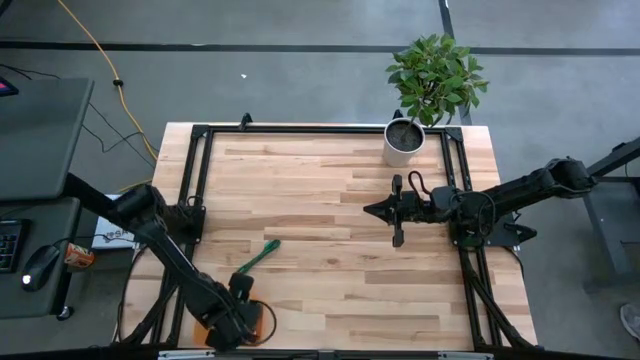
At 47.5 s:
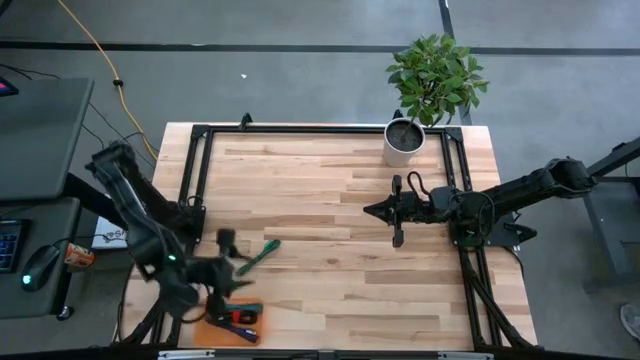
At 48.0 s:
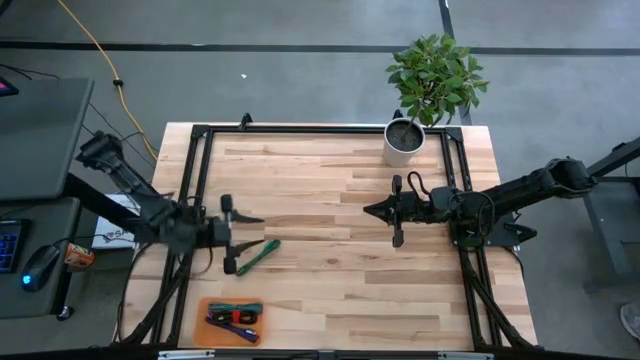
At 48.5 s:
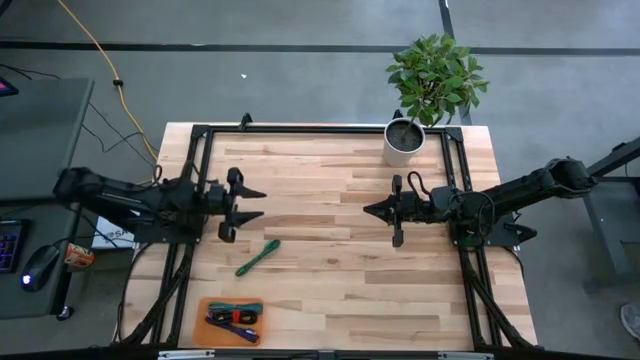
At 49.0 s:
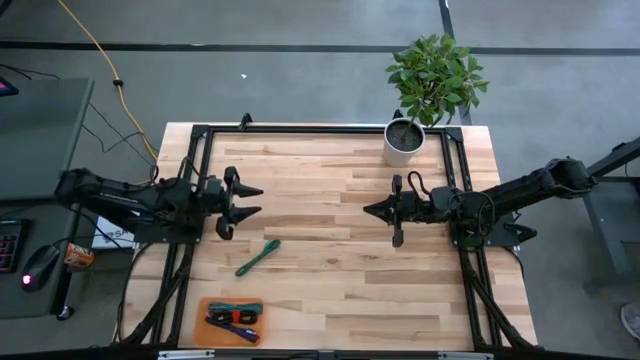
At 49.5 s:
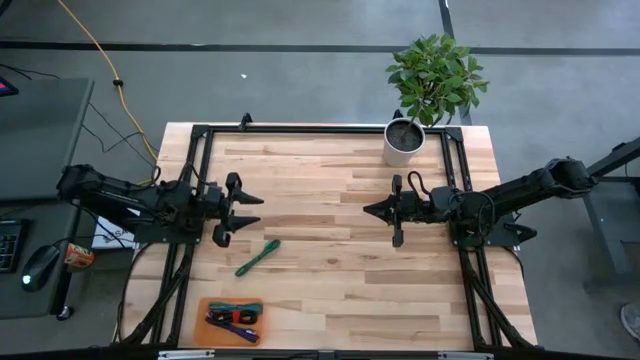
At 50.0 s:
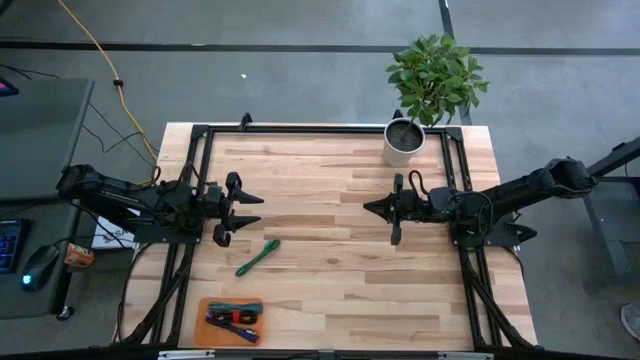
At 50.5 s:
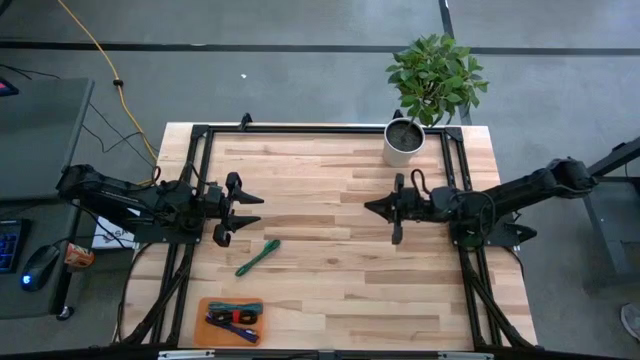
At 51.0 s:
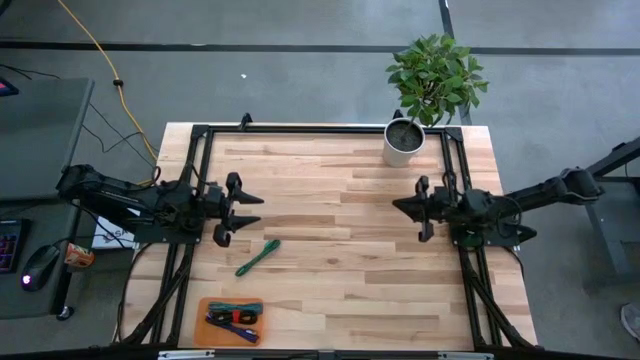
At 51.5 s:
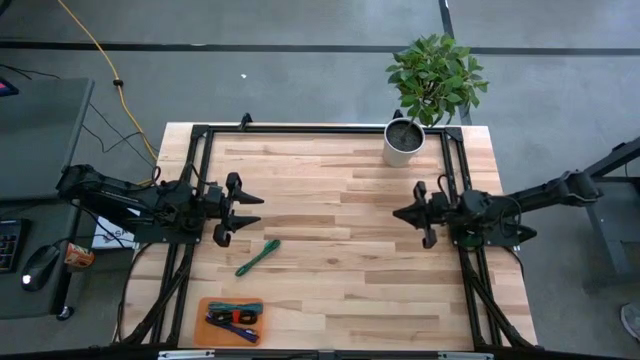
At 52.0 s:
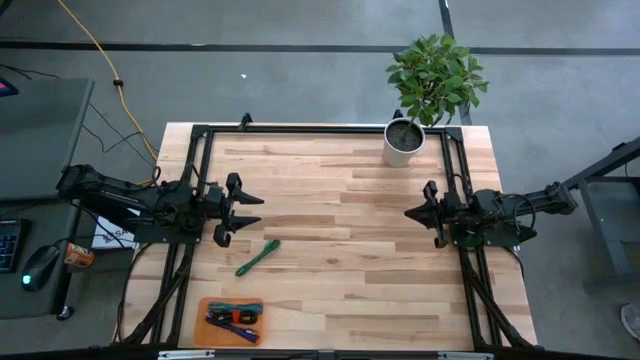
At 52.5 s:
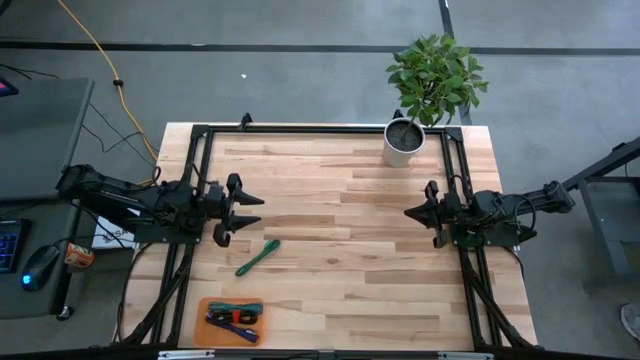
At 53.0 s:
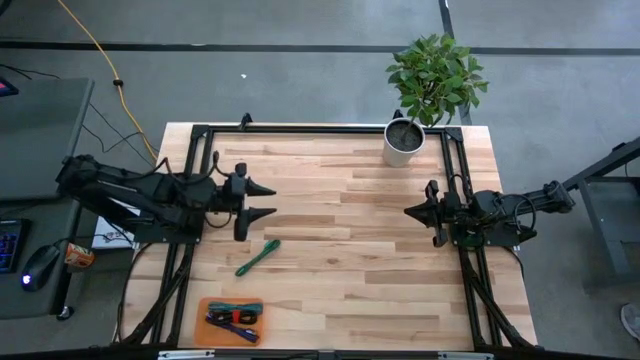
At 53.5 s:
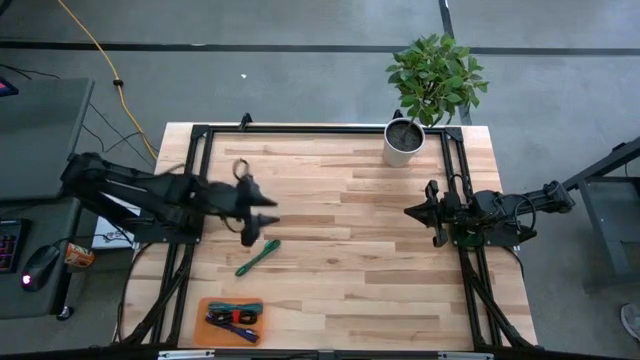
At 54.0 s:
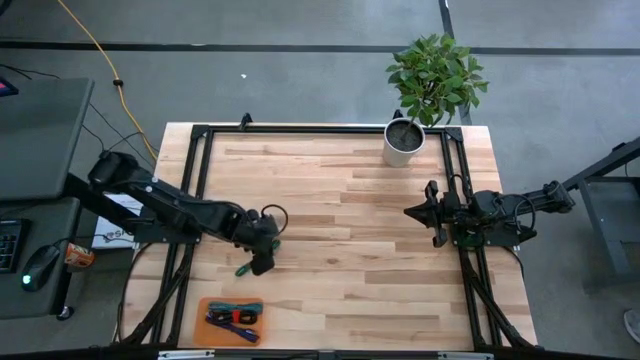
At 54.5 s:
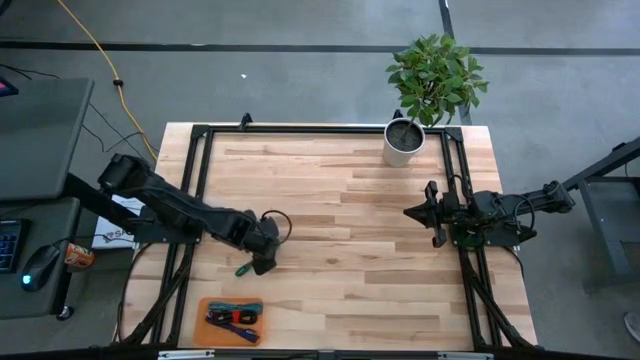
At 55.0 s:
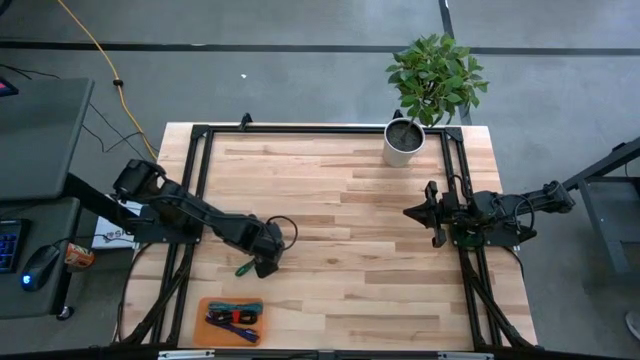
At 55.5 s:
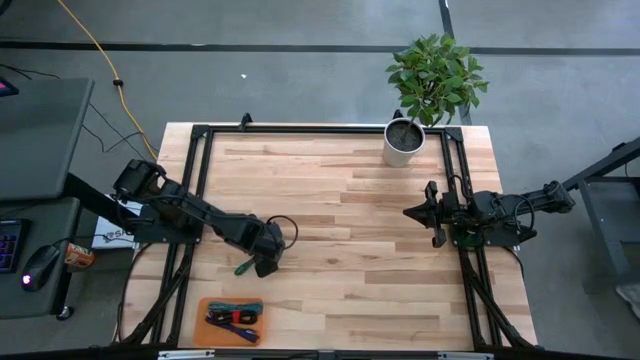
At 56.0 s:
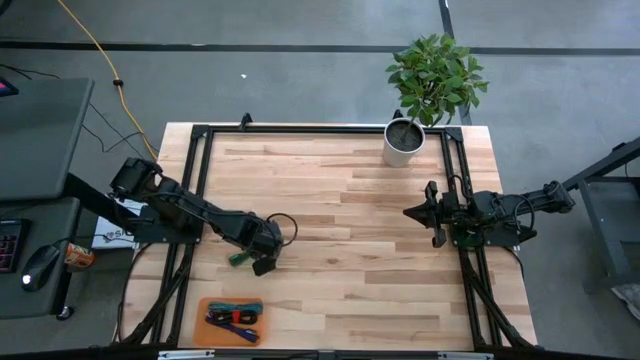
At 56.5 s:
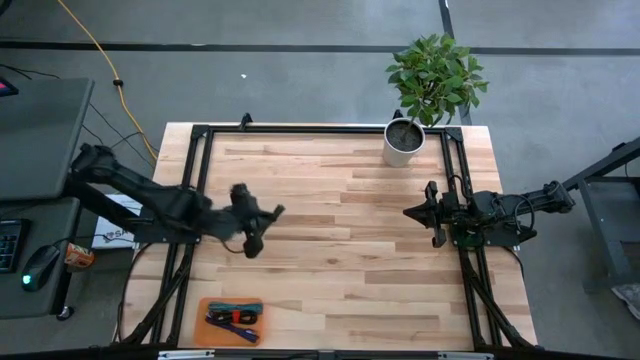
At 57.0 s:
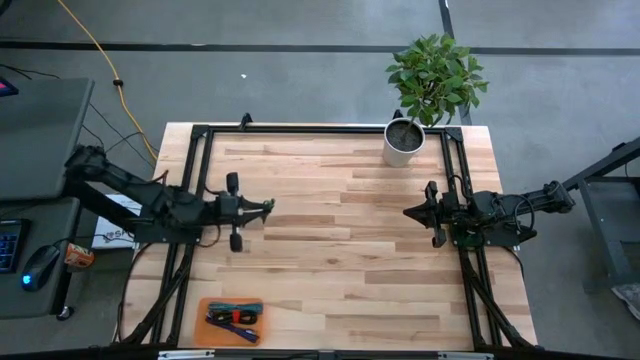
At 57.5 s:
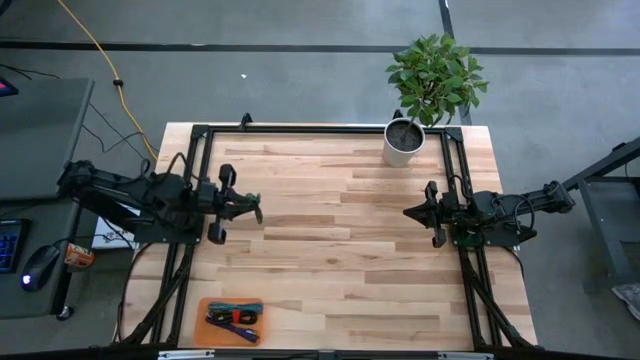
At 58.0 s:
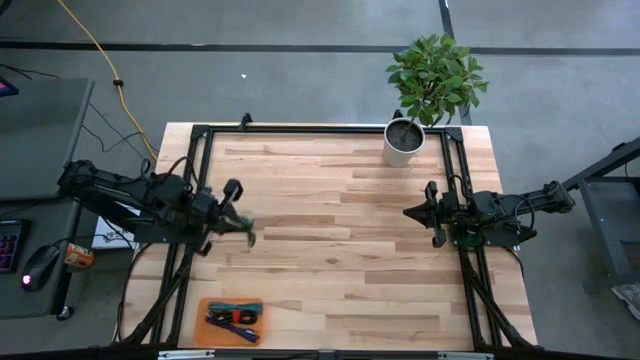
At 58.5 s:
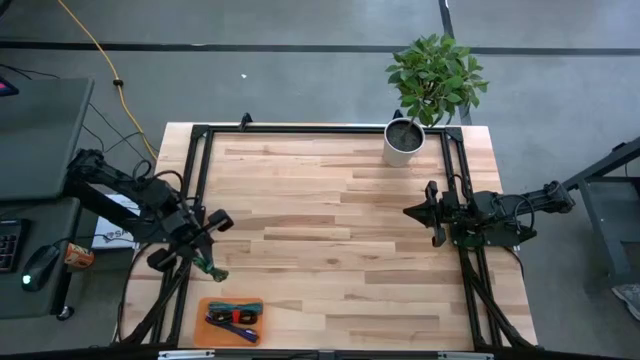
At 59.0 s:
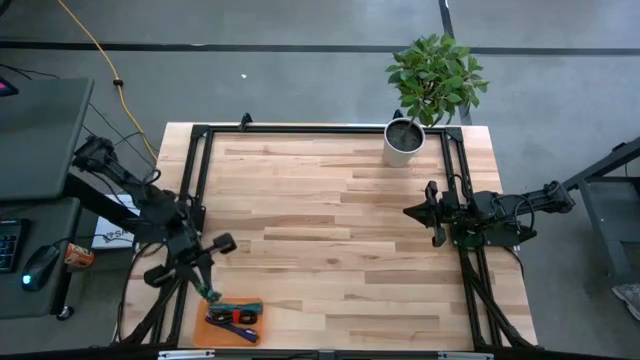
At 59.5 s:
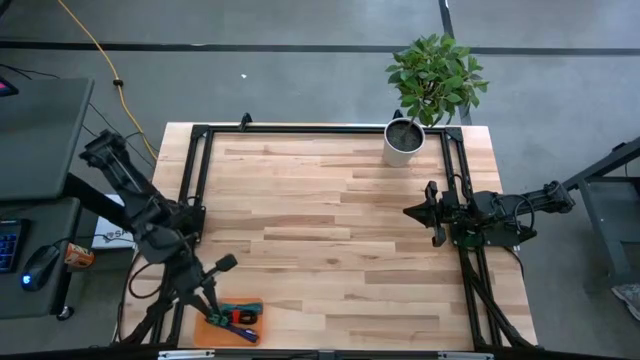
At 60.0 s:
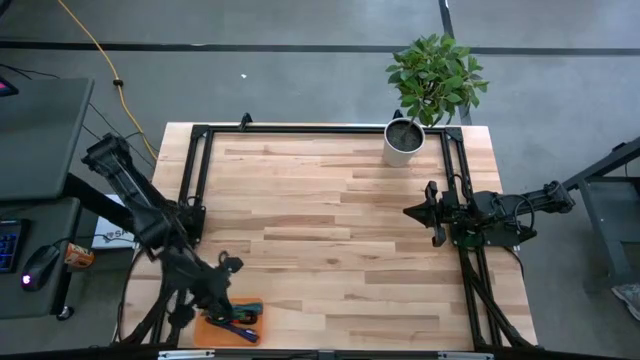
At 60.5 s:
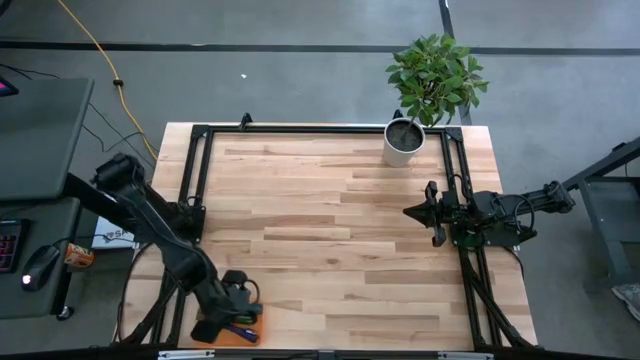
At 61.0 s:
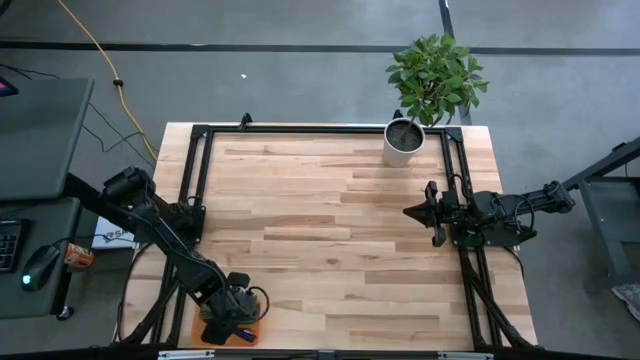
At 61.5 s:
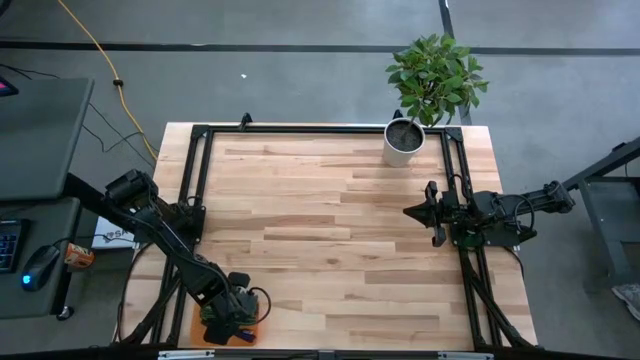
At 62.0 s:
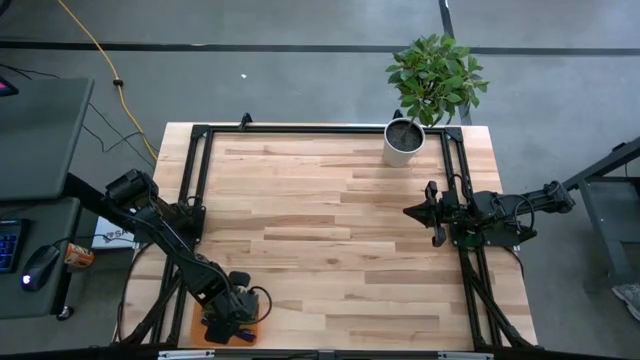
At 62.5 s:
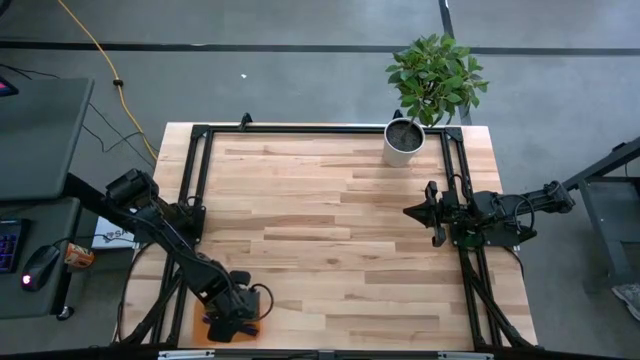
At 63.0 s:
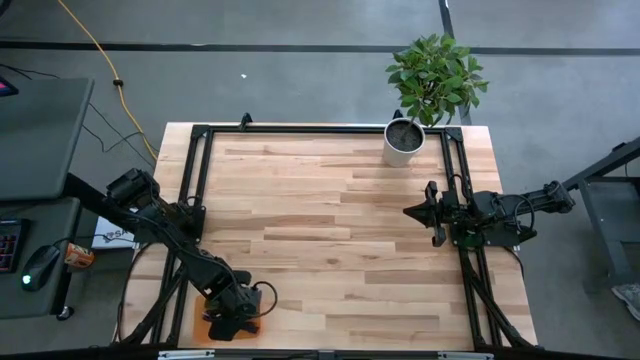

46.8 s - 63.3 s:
Task: Pick and place USB-C Cables
Put the green charger cable into the orange bin

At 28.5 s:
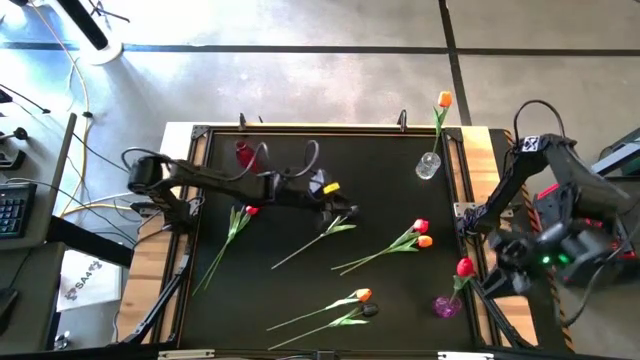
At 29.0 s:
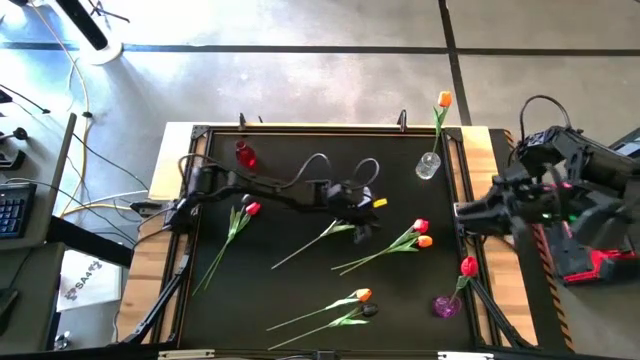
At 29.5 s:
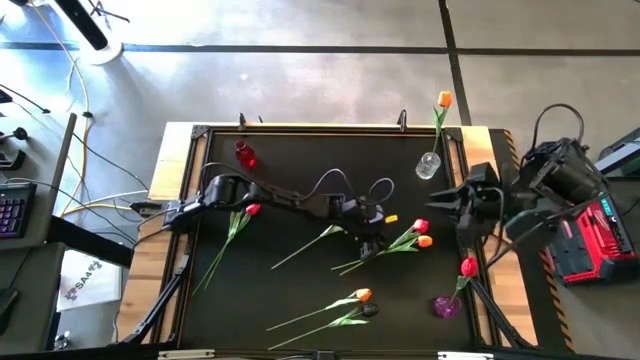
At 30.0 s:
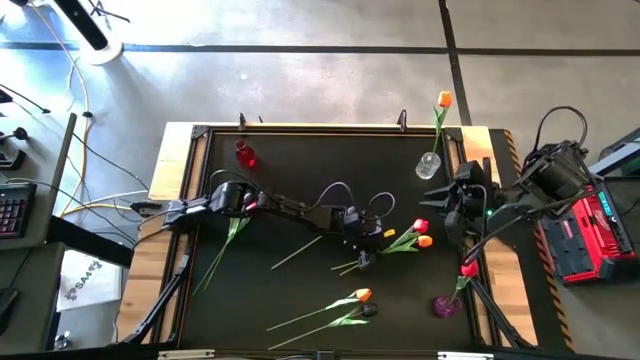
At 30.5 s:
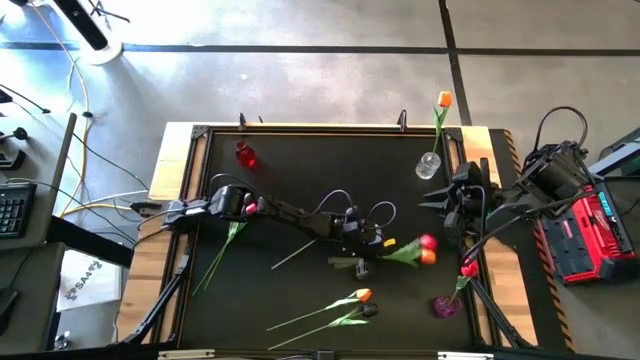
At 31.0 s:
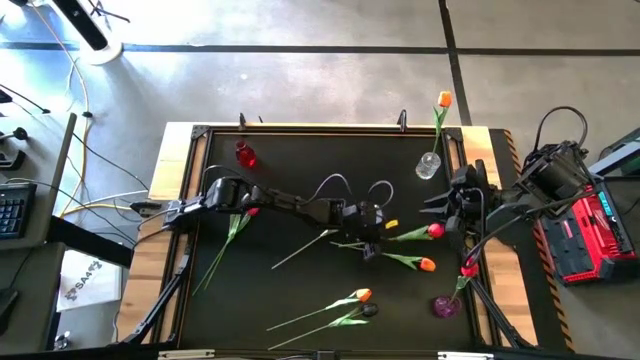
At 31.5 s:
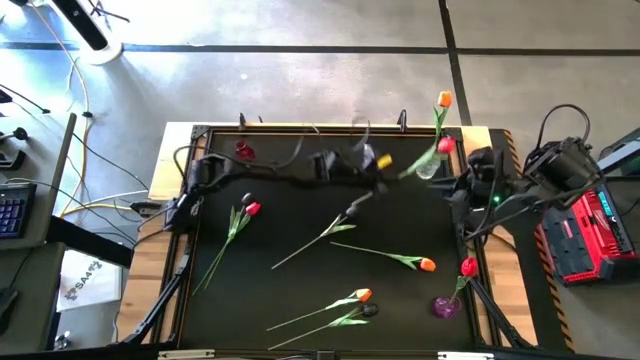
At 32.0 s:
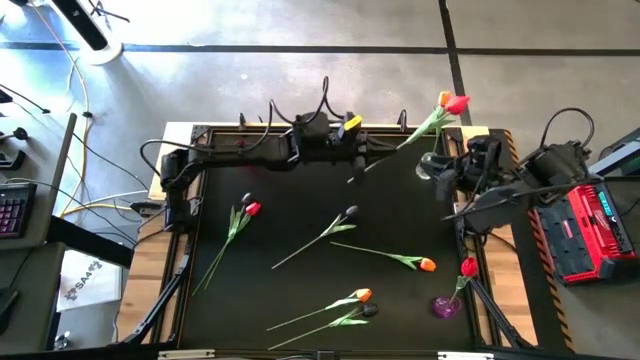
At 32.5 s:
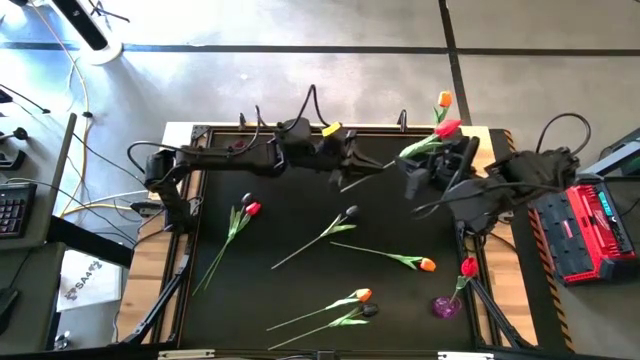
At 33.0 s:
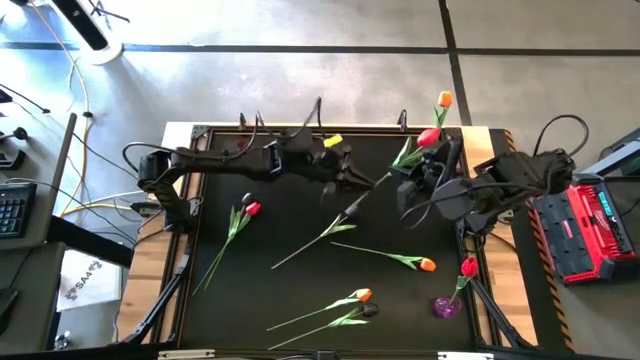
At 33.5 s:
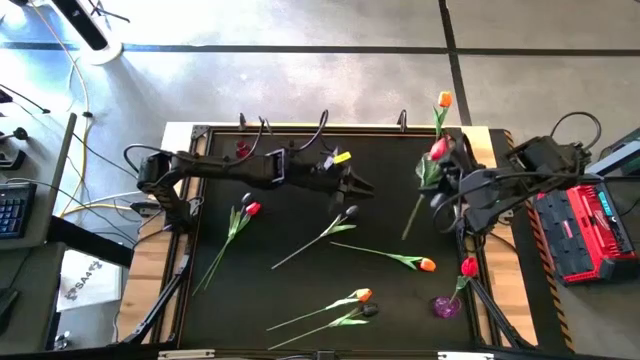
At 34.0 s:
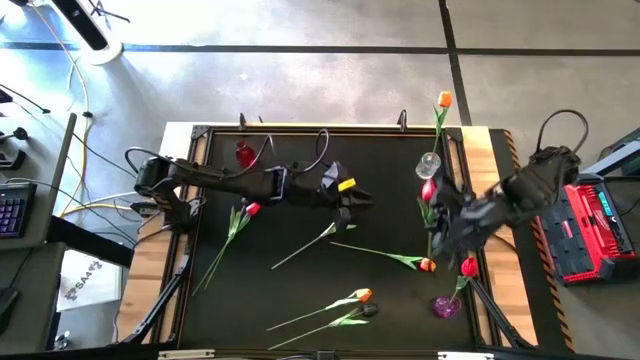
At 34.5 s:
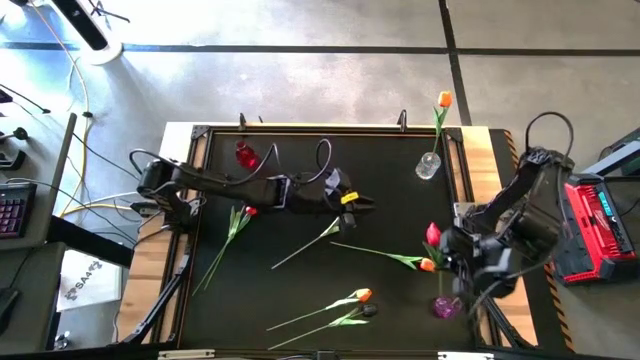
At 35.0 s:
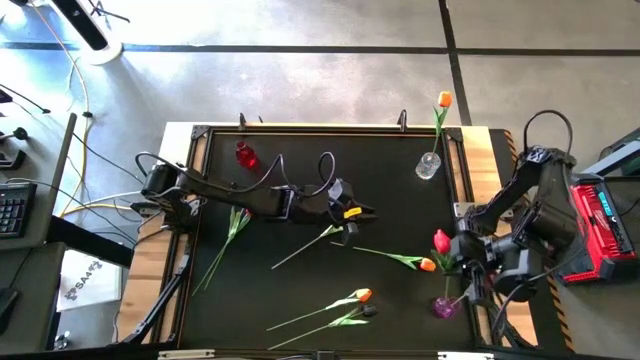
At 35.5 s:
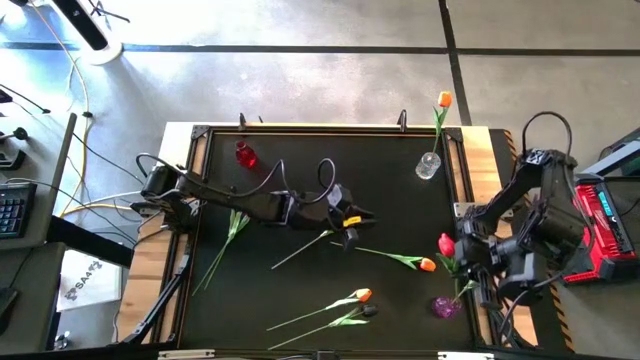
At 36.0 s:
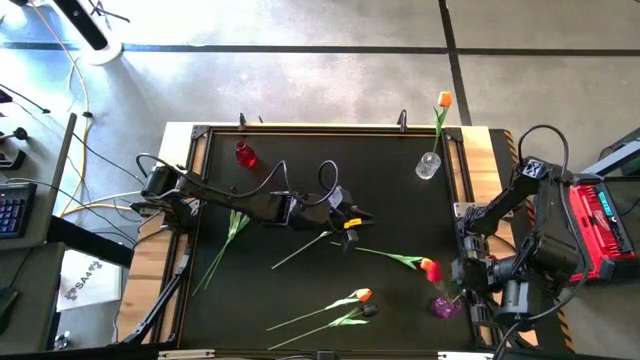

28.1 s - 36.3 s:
Task: Sort flowers into vase by color
Put the right red tulip into the purple vase
